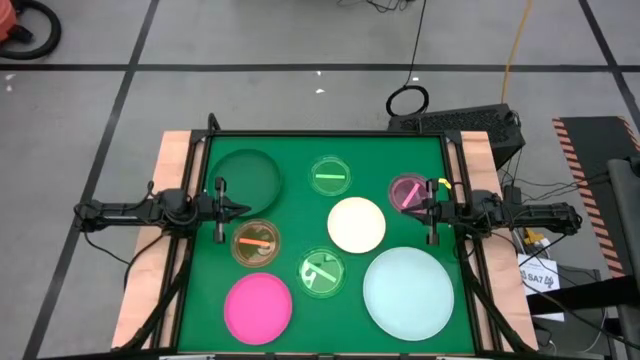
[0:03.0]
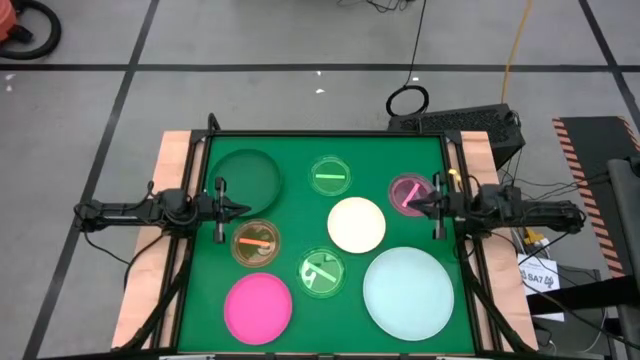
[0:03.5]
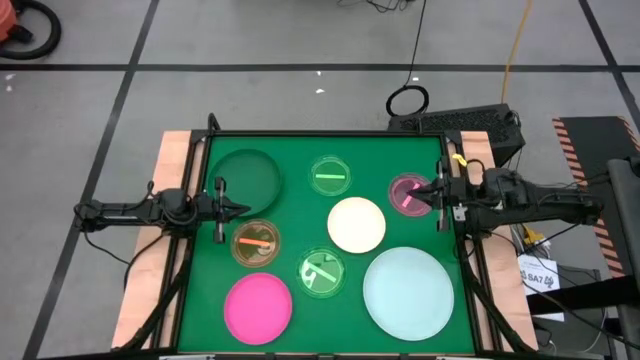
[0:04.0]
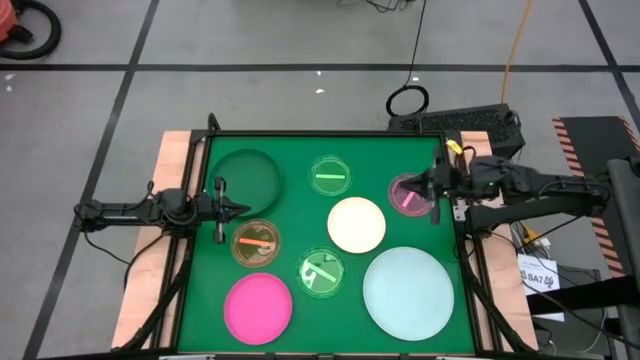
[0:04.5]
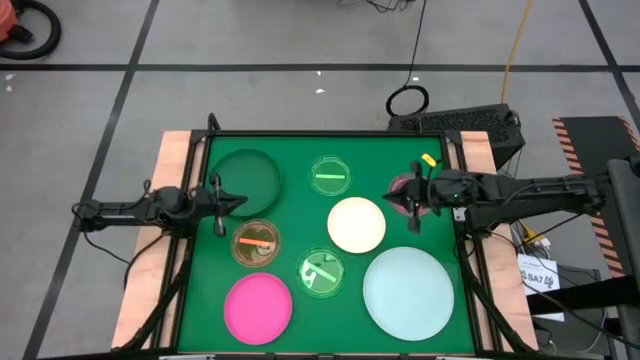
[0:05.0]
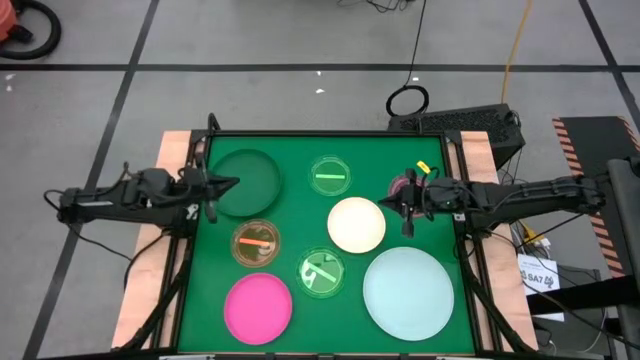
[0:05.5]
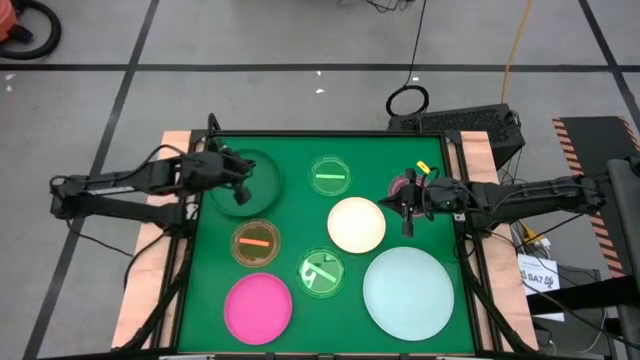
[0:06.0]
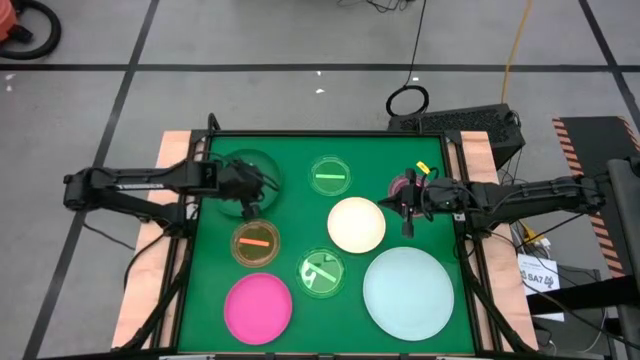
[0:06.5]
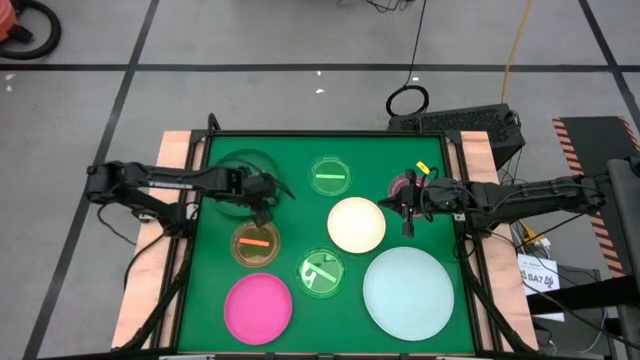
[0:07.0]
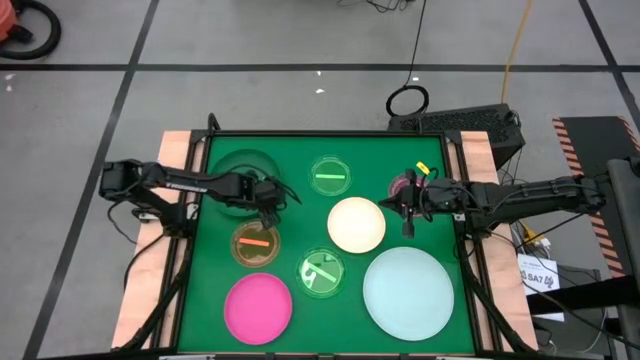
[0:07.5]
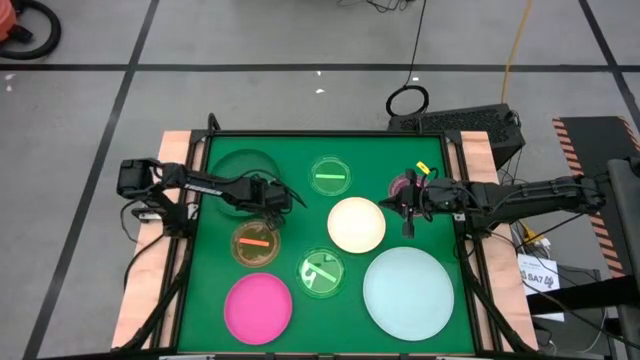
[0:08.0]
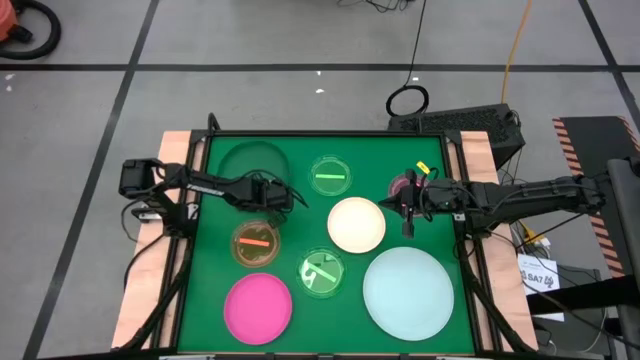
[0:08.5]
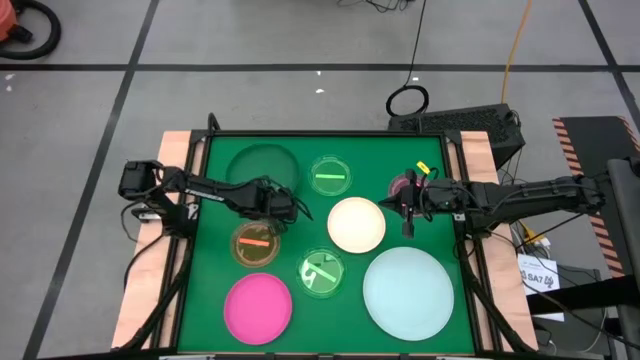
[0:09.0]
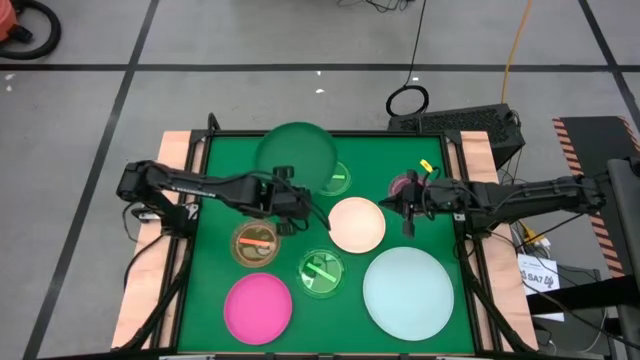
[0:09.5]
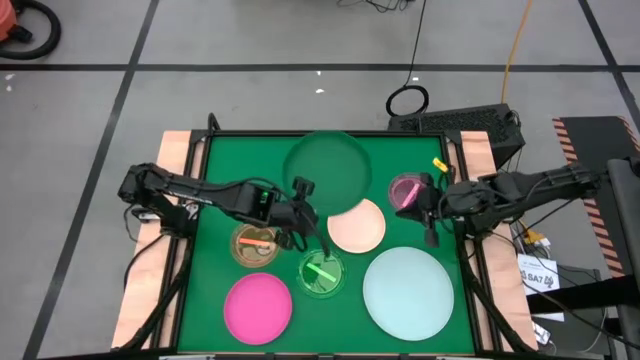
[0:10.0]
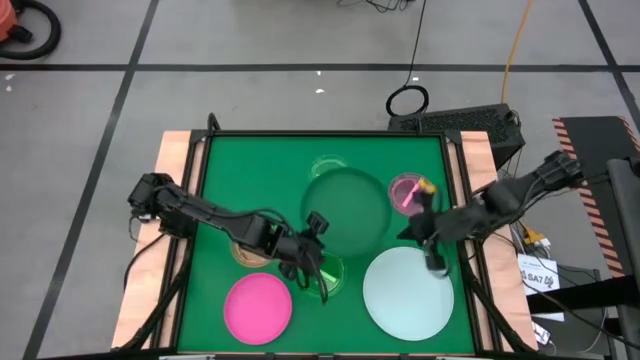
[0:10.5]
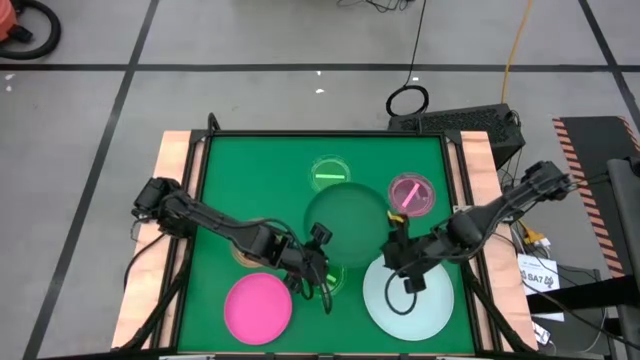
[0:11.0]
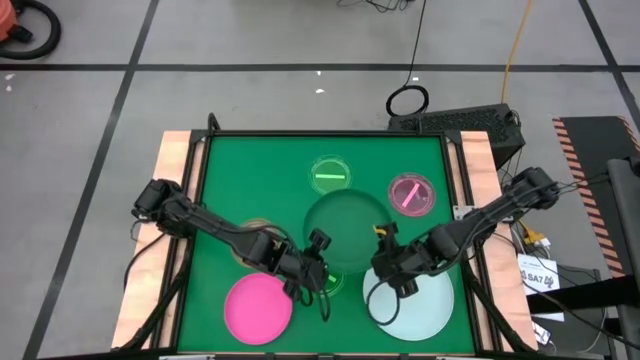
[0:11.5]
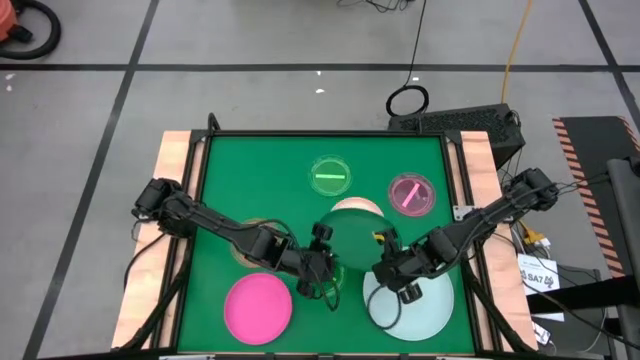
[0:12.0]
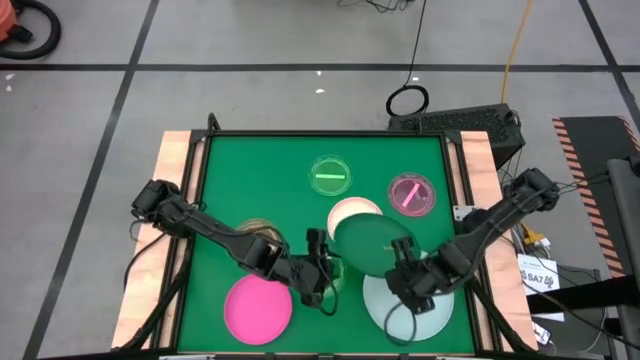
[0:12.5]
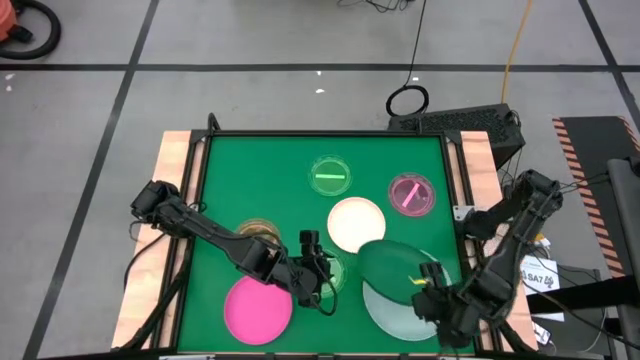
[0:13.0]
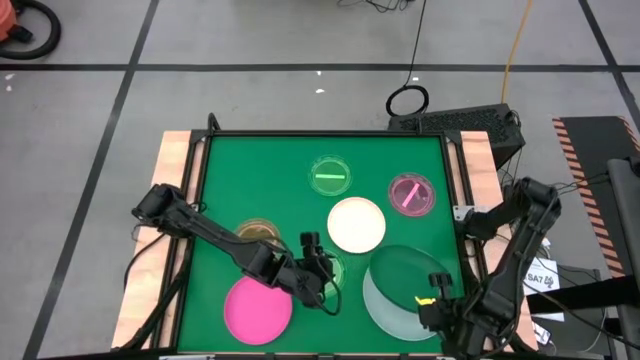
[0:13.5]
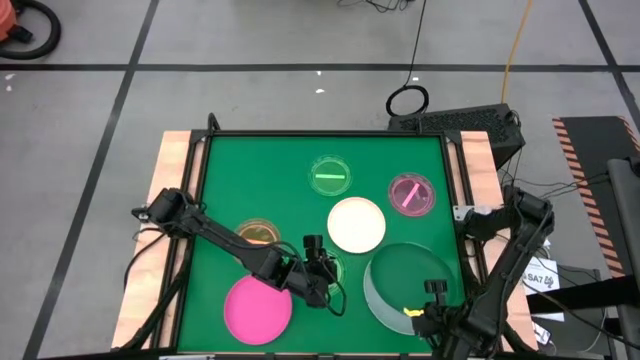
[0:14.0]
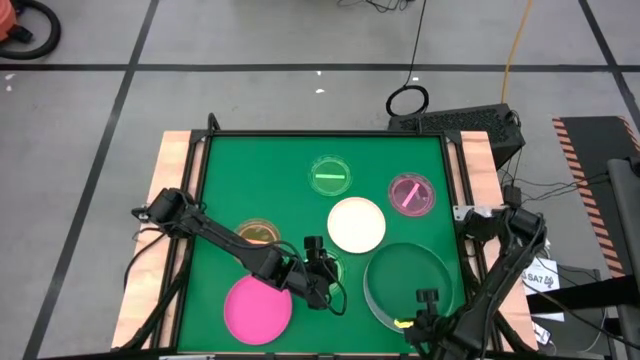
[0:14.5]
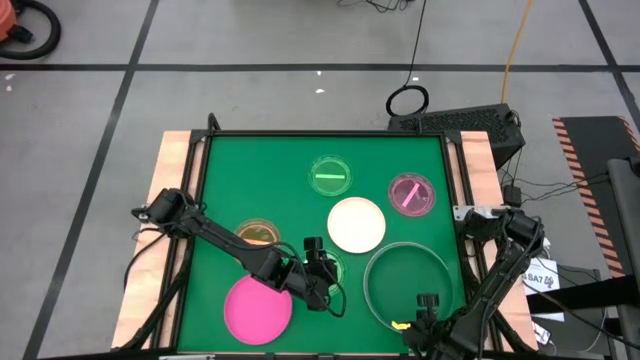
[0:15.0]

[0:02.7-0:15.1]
Task: Stack plastic plates
Stack the dark green plate on top of the blue plate

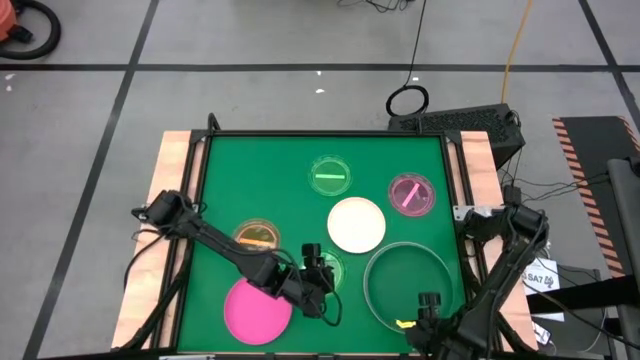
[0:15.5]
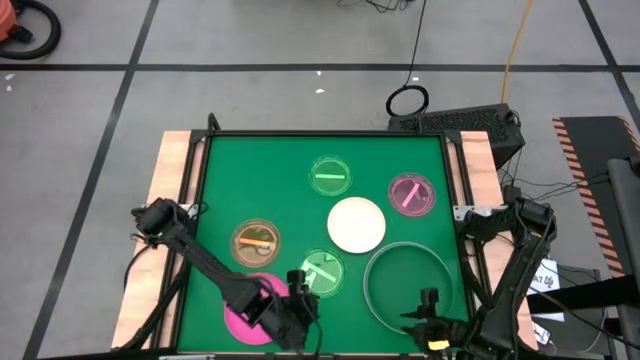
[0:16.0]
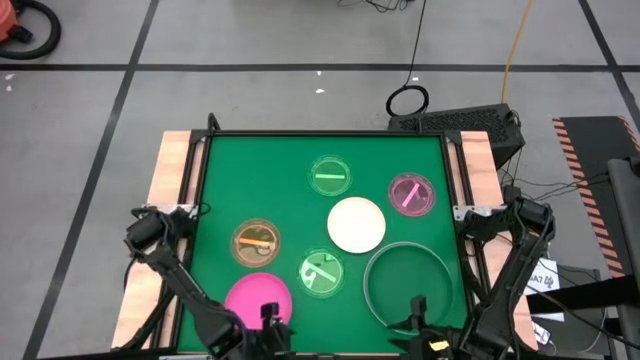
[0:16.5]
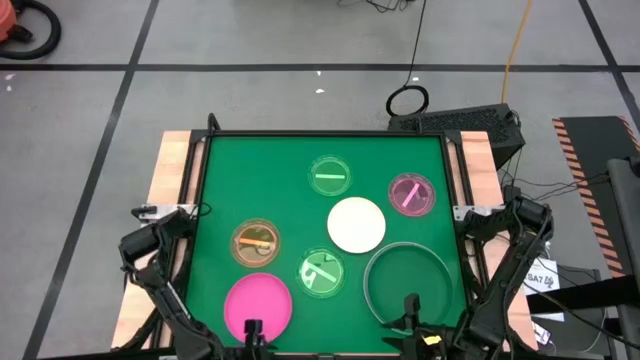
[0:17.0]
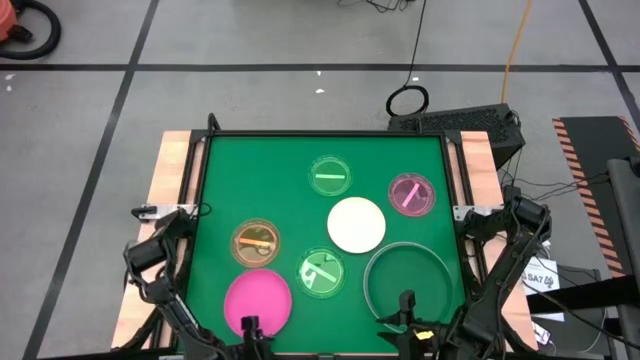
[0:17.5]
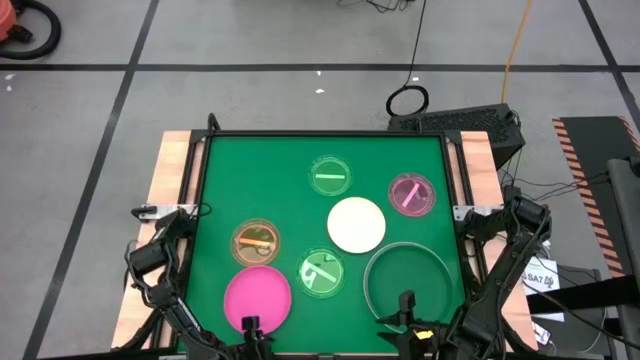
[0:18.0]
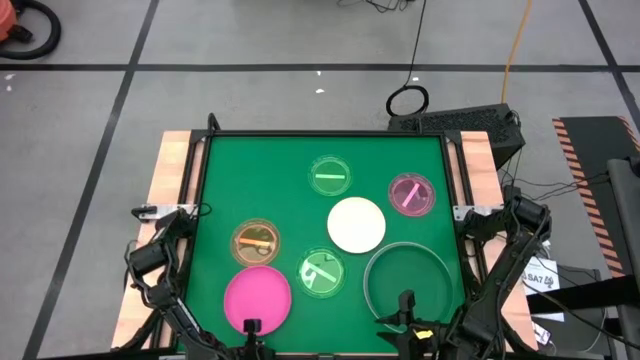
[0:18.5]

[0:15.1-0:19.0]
Stack the dark pink plate on top of the dark green plate

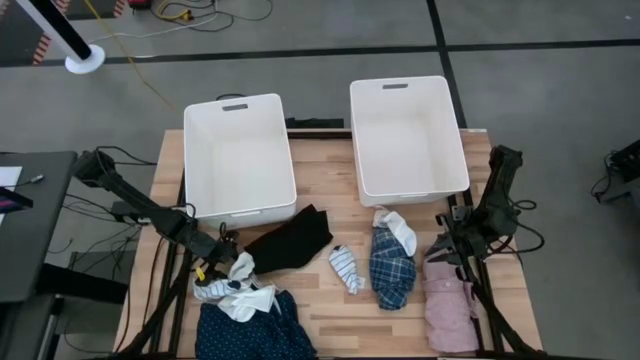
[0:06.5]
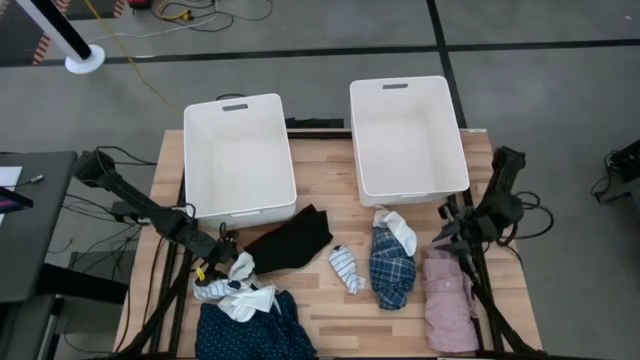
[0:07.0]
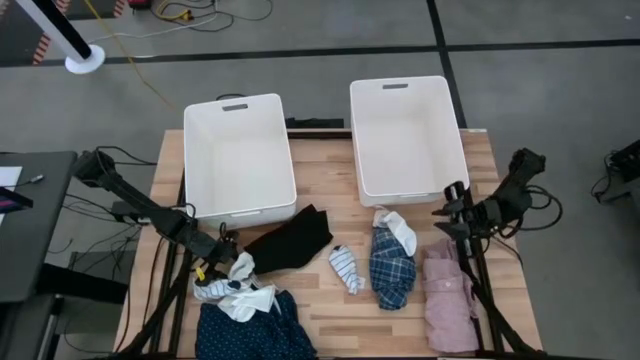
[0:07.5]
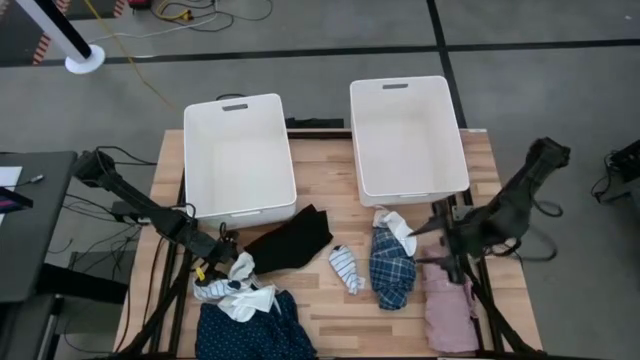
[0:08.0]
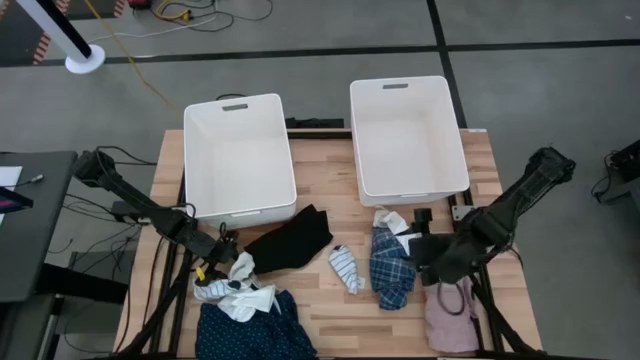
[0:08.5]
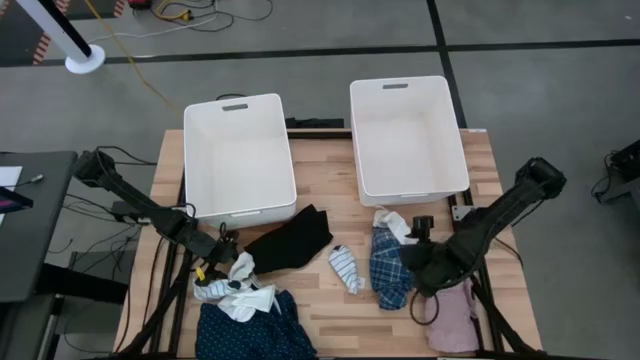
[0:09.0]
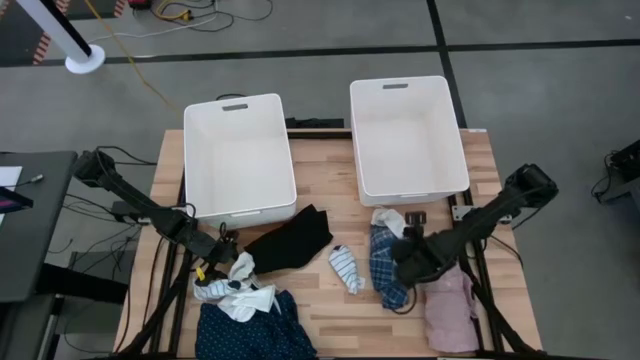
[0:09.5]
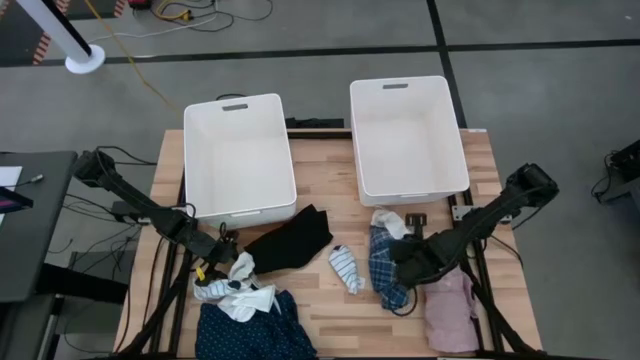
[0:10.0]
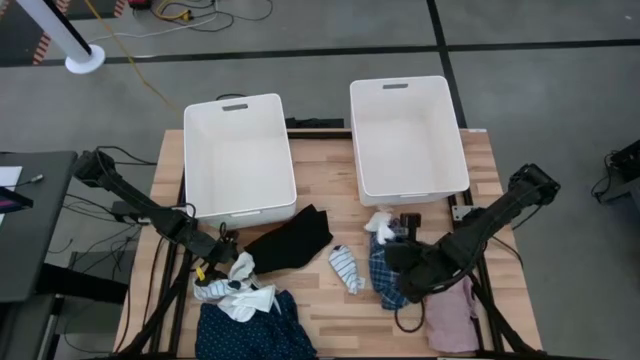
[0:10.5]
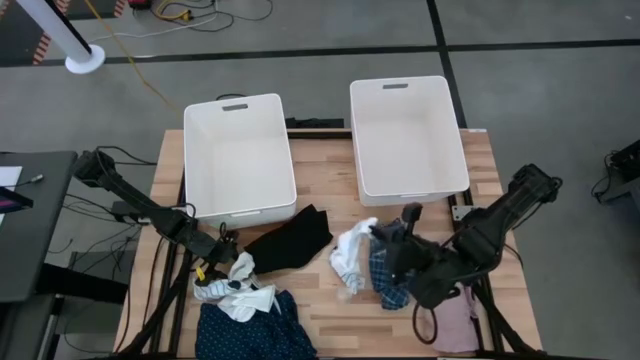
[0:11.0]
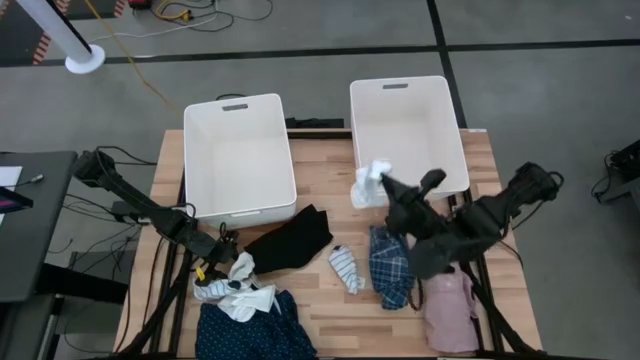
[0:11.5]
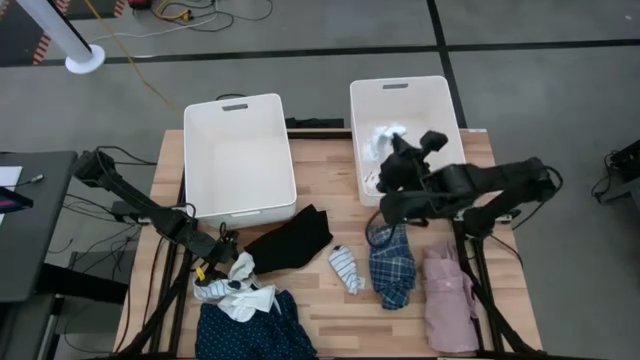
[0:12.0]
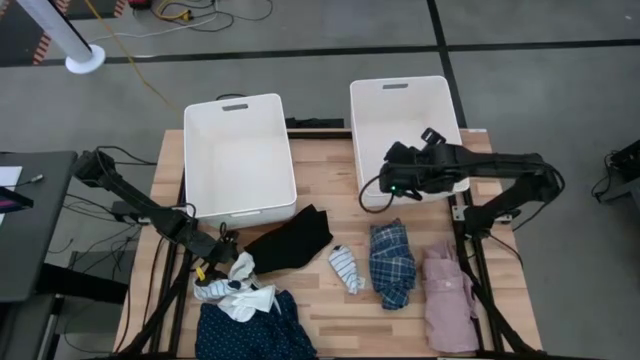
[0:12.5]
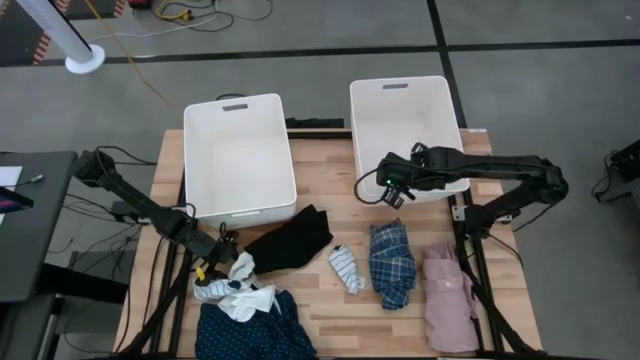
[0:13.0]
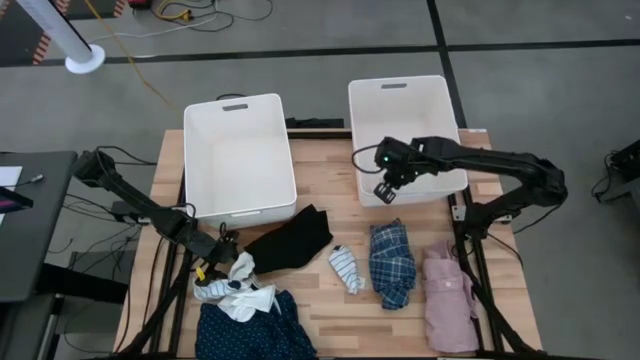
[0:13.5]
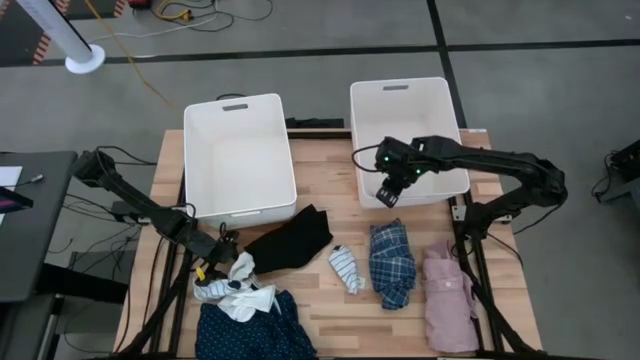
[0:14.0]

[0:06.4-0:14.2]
Task: Sort clothes
Put the right white sock into the right bin
